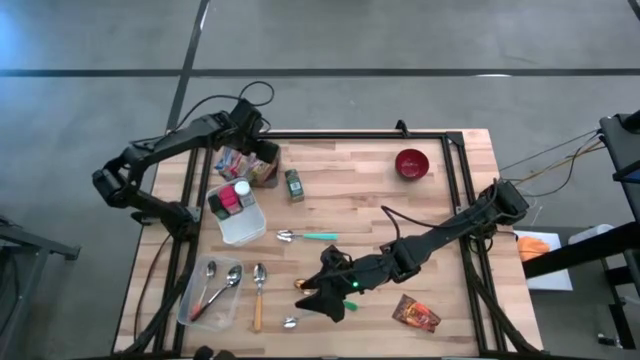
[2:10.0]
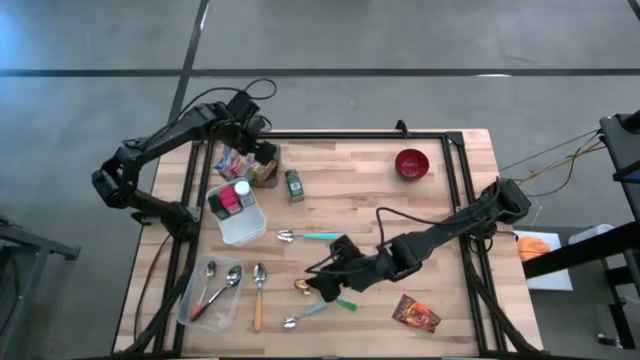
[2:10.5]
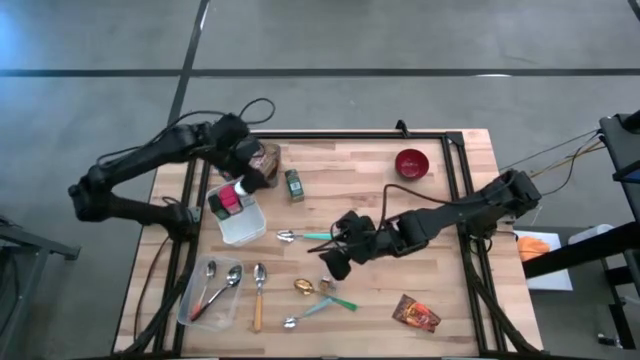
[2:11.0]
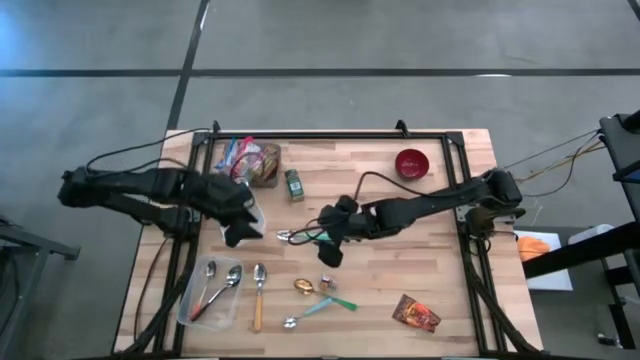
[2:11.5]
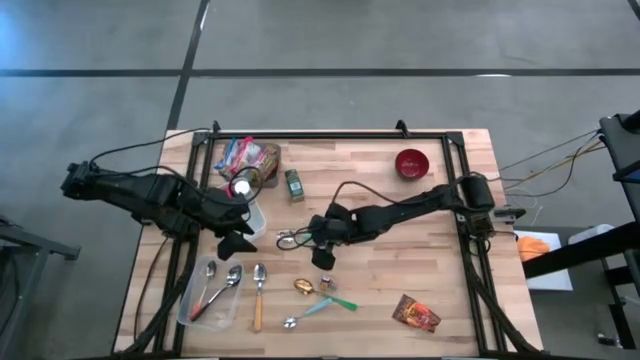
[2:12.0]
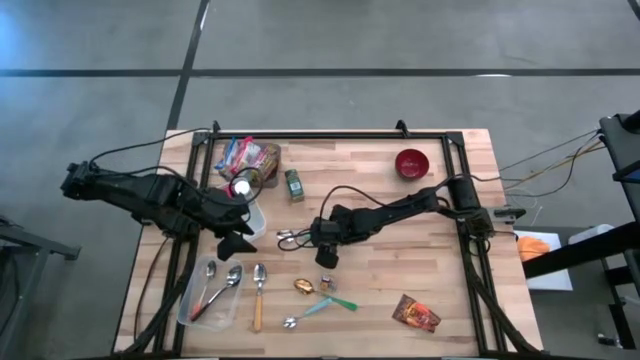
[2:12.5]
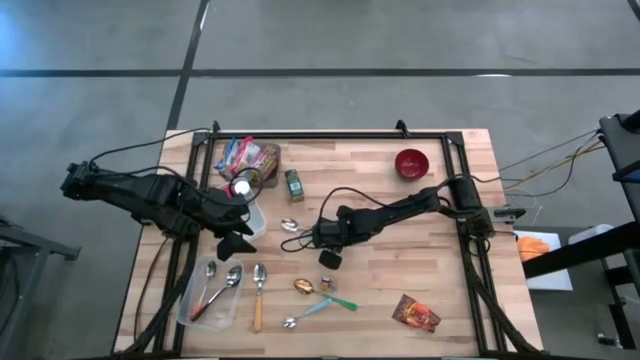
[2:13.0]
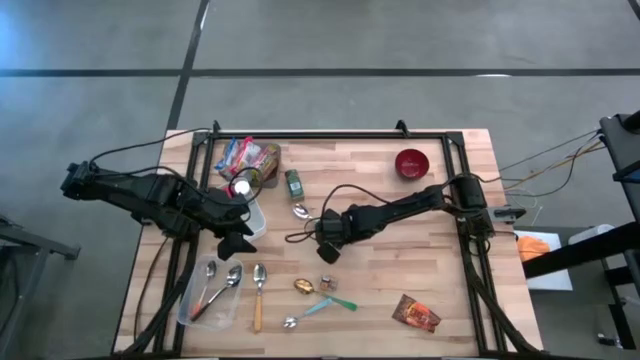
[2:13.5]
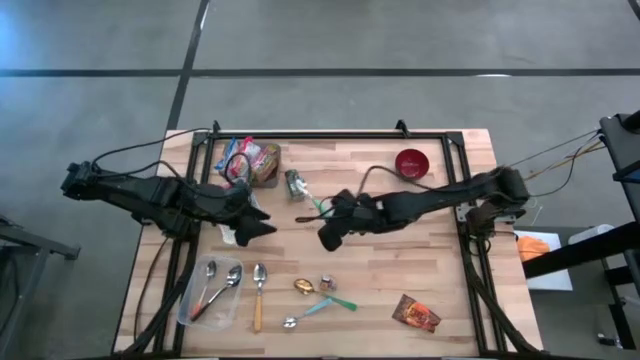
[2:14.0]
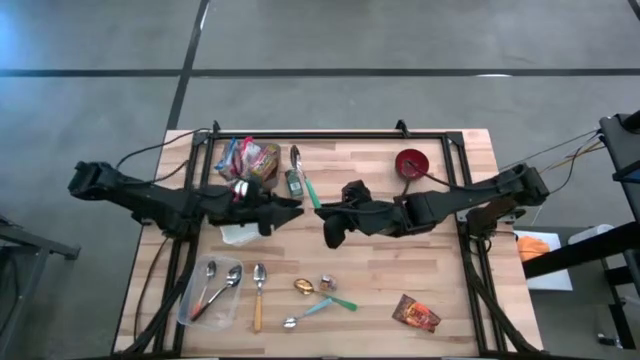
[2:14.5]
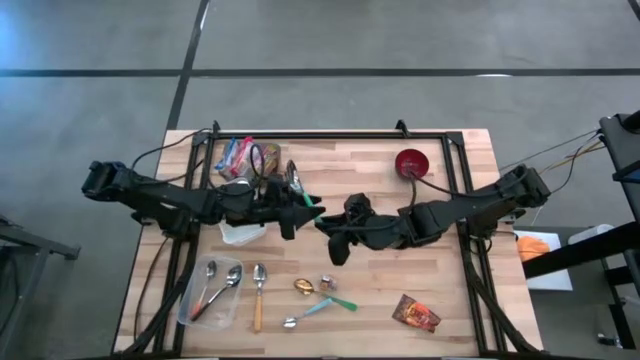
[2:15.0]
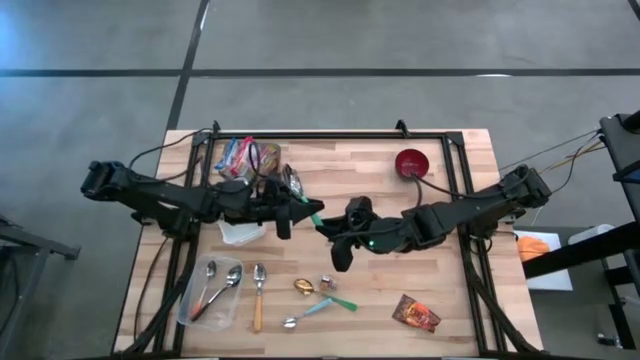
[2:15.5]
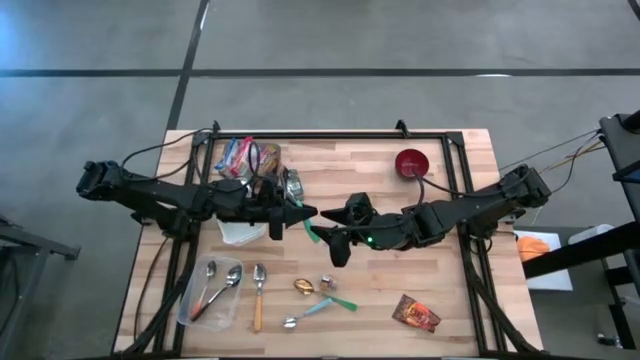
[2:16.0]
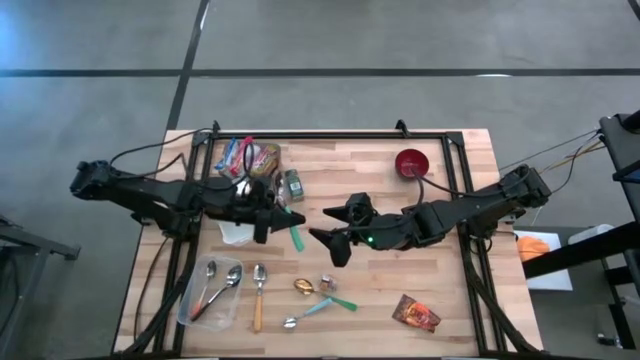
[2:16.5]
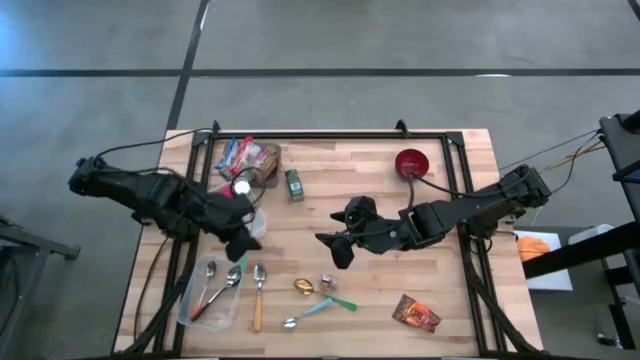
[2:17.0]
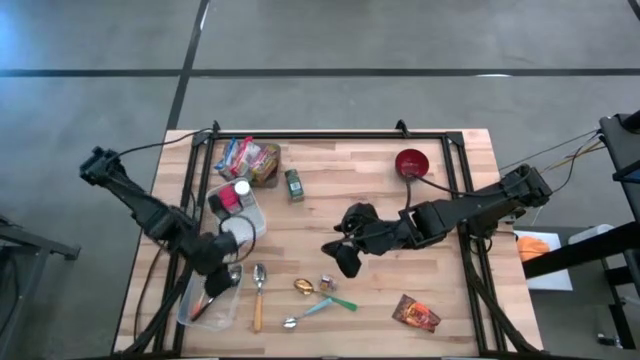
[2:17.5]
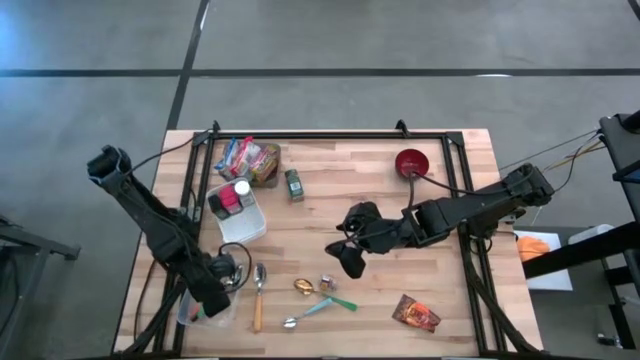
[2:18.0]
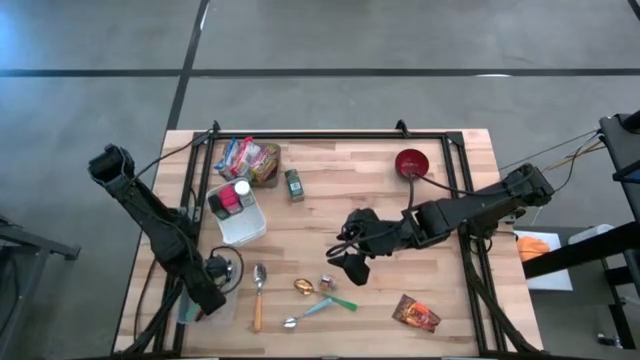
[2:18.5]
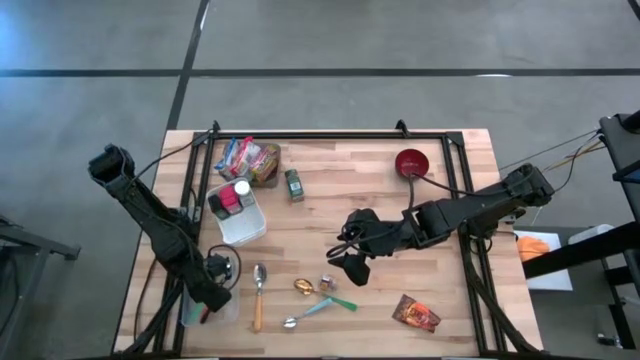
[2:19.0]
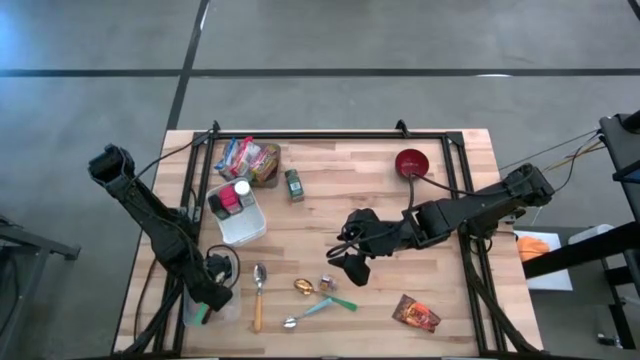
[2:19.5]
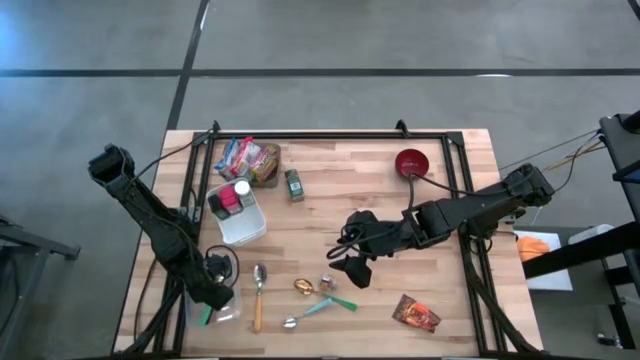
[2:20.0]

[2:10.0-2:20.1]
Put the light blue spoon into the transparent bin

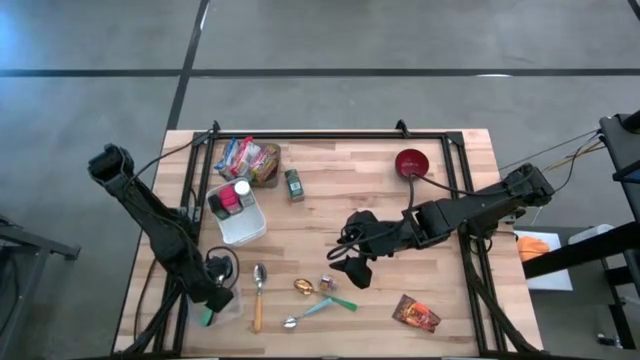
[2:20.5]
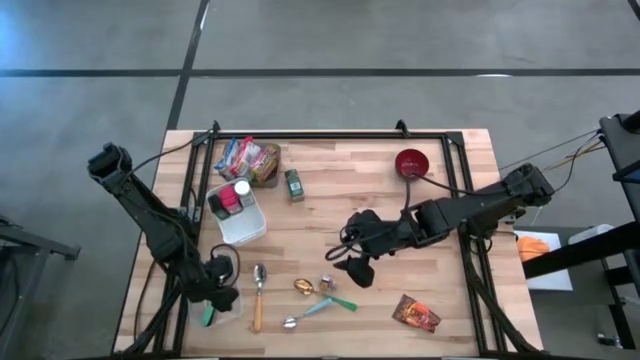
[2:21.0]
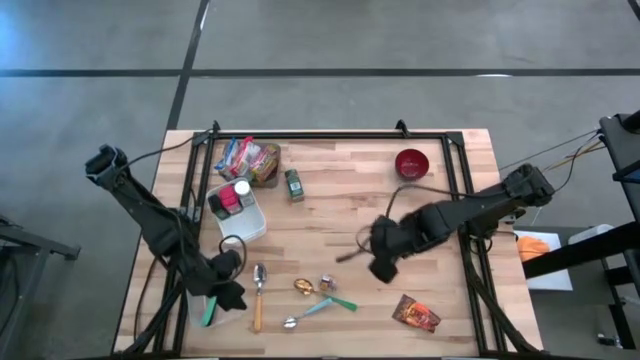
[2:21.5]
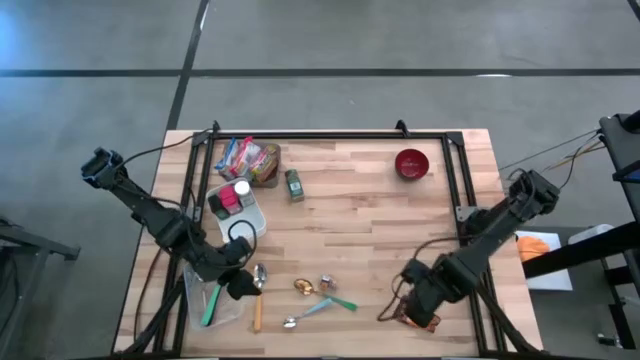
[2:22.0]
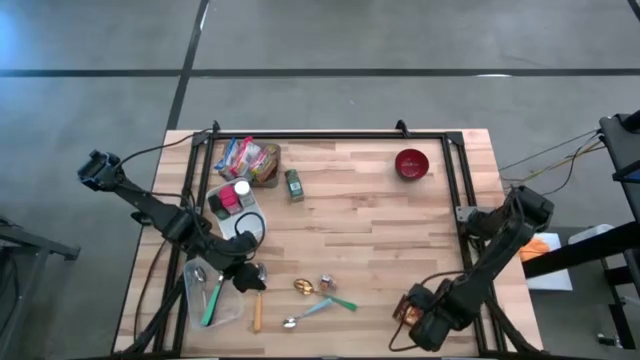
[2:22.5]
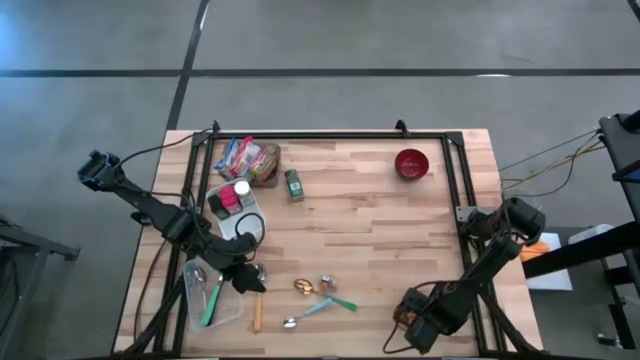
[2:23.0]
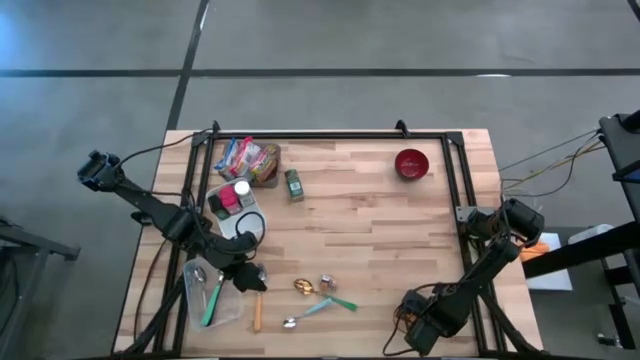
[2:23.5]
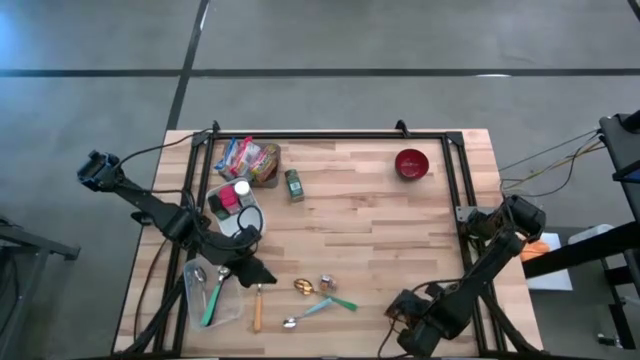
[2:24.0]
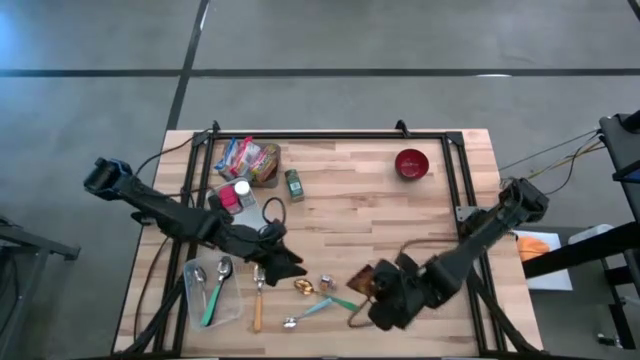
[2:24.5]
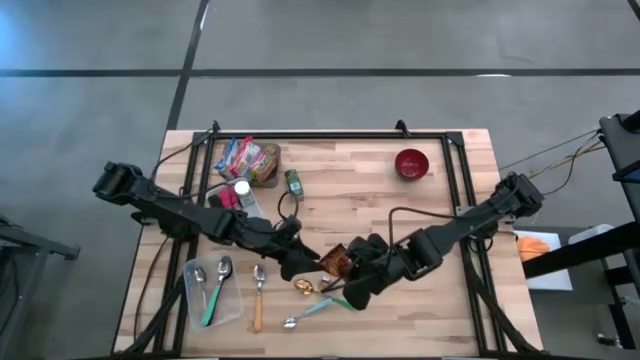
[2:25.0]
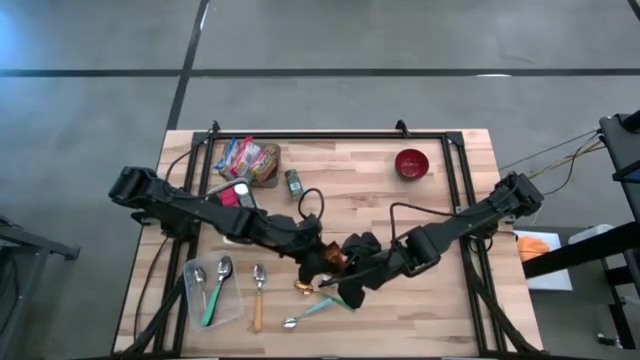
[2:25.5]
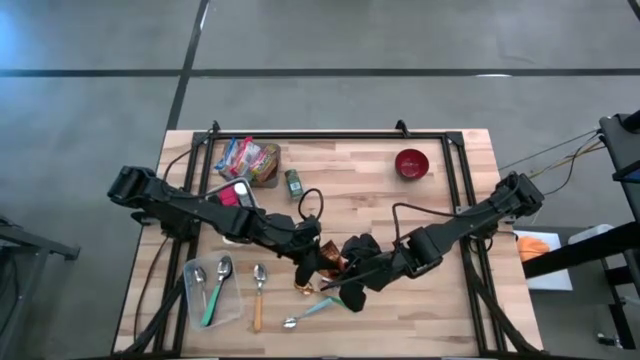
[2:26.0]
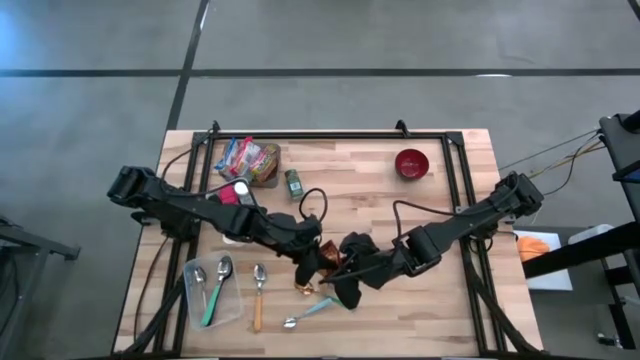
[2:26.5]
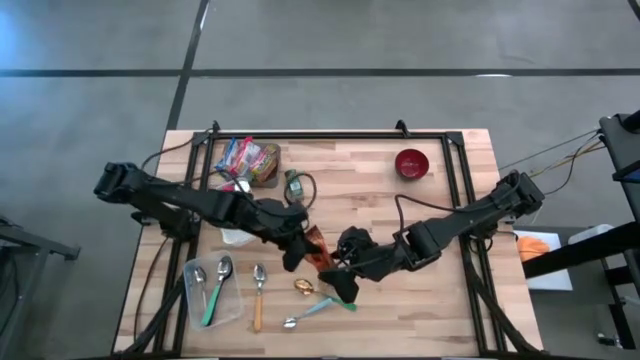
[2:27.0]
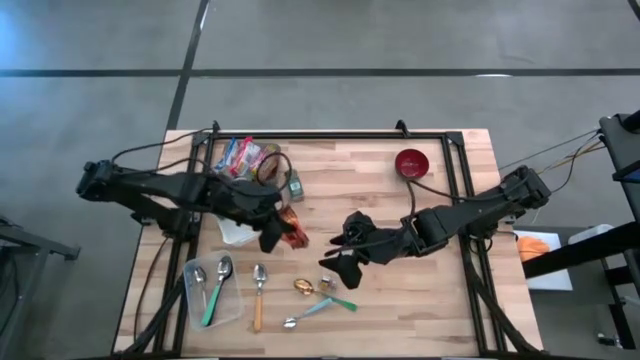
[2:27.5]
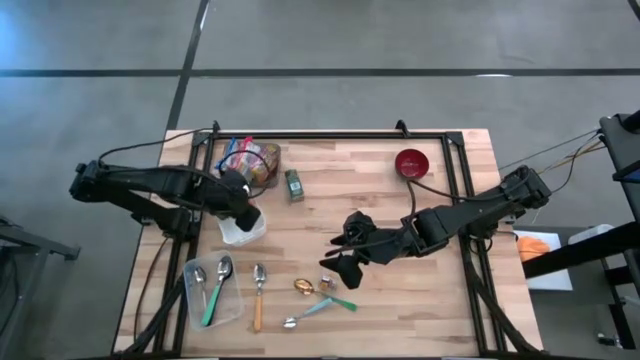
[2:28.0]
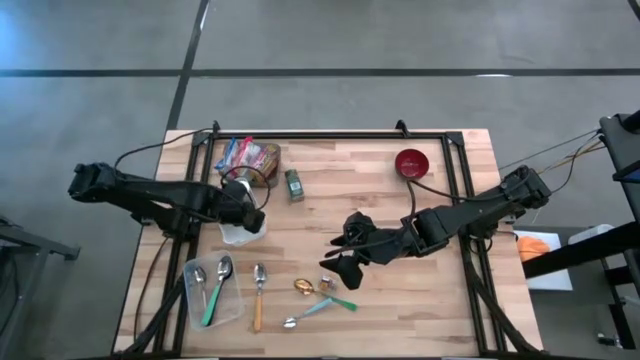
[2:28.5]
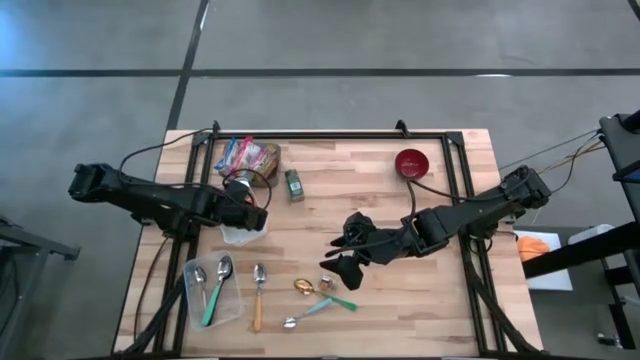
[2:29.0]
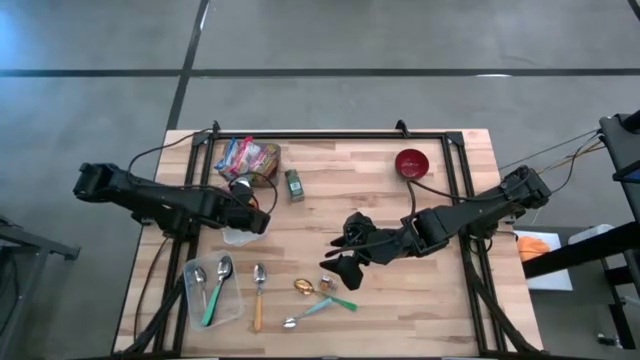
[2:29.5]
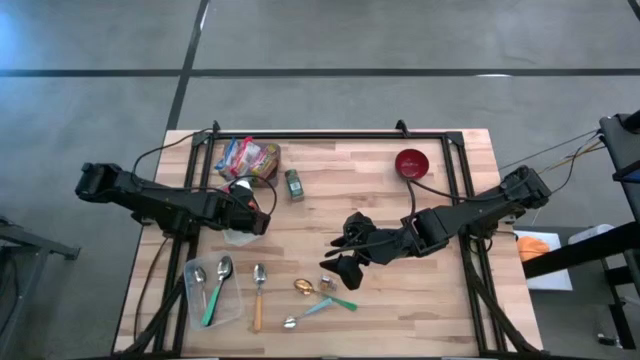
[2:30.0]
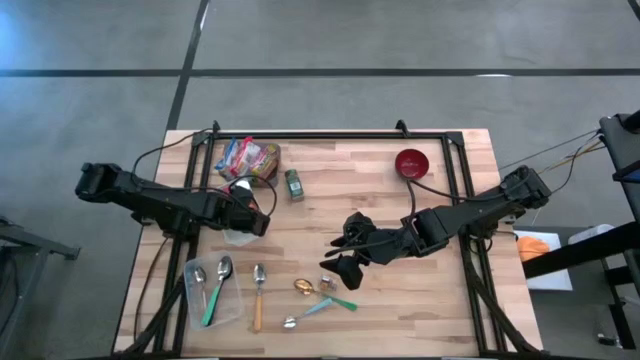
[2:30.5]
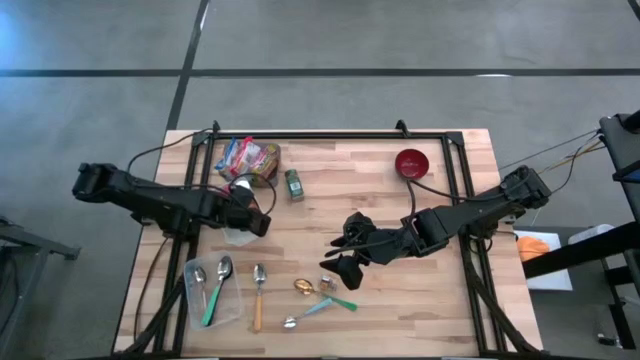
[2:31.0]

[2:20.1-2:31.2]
Put the orange seasoning bag into the white bin
